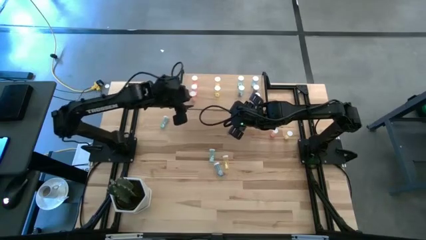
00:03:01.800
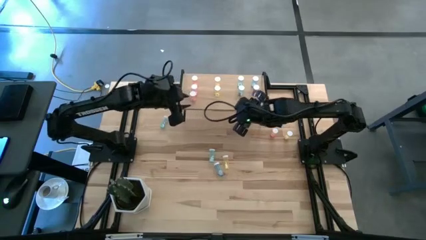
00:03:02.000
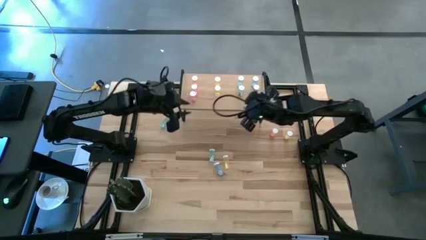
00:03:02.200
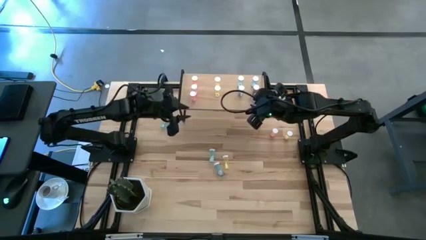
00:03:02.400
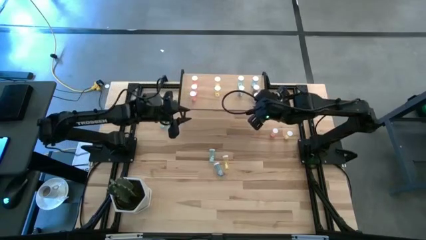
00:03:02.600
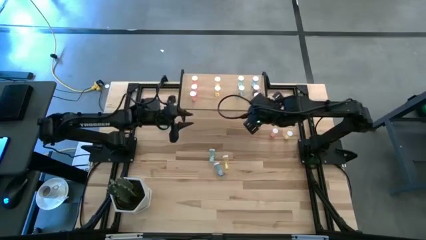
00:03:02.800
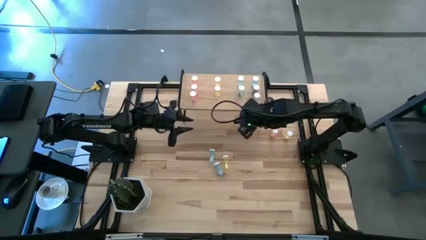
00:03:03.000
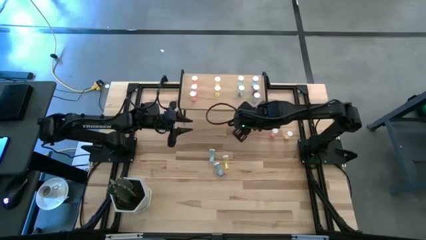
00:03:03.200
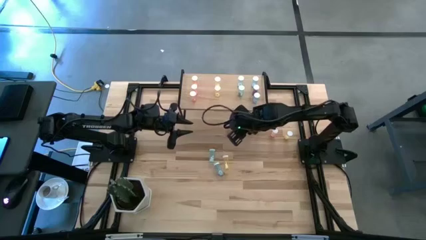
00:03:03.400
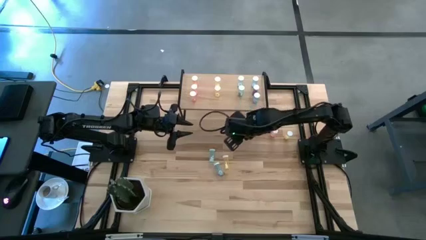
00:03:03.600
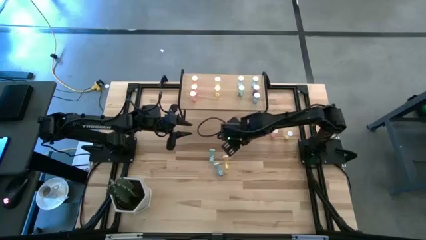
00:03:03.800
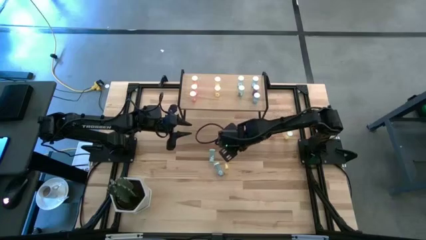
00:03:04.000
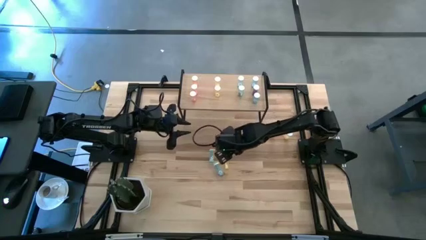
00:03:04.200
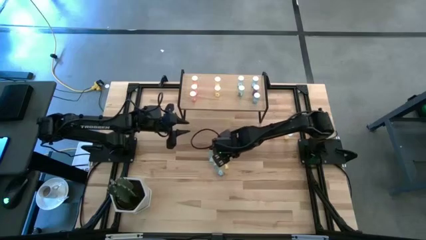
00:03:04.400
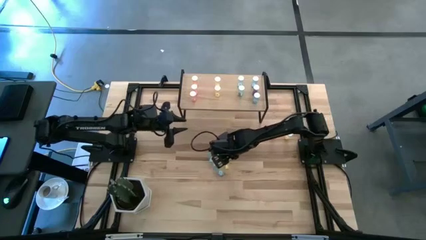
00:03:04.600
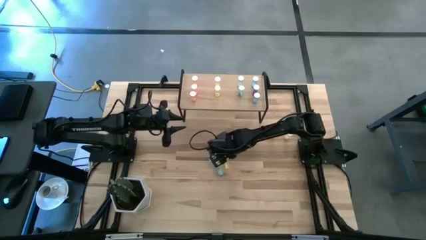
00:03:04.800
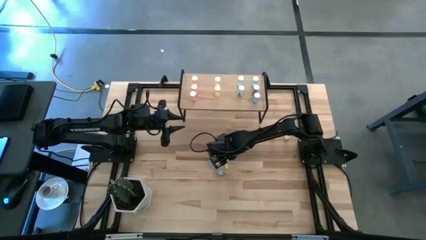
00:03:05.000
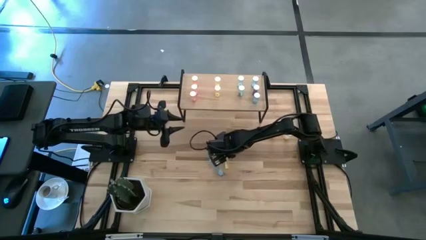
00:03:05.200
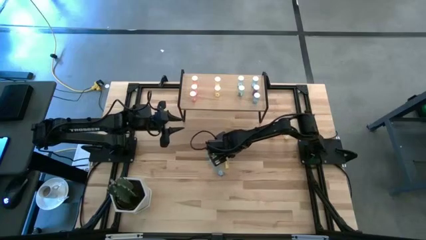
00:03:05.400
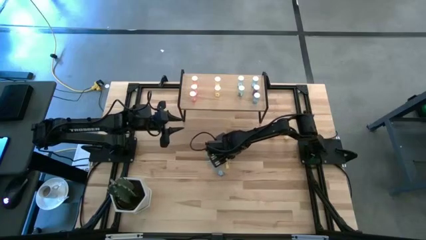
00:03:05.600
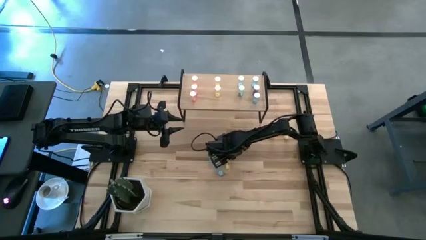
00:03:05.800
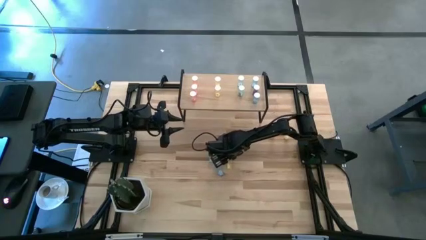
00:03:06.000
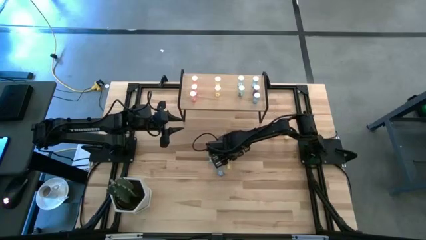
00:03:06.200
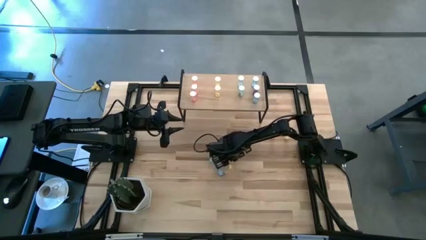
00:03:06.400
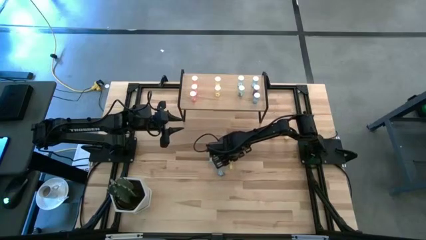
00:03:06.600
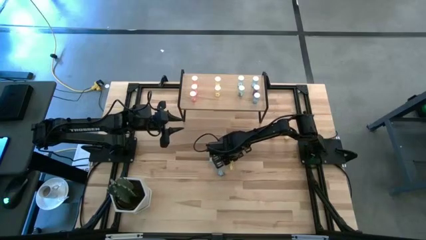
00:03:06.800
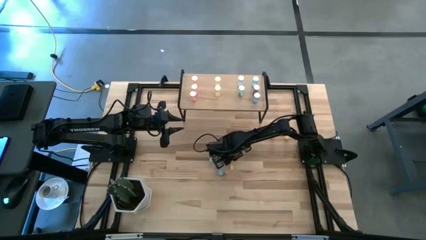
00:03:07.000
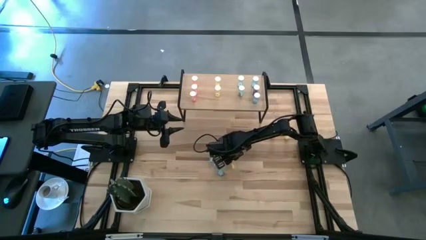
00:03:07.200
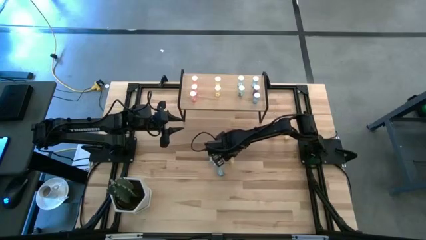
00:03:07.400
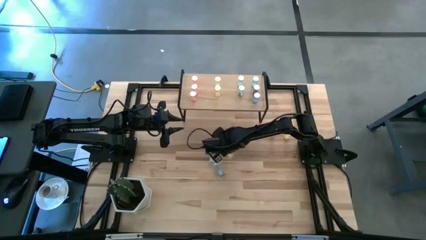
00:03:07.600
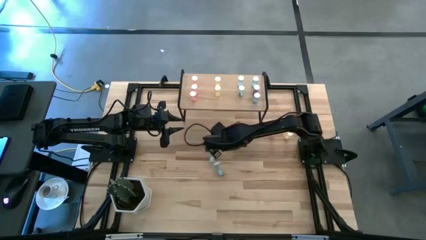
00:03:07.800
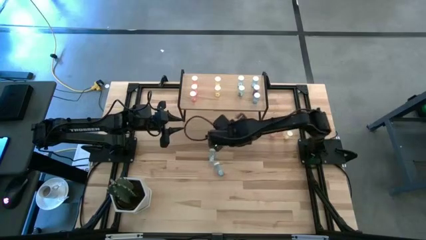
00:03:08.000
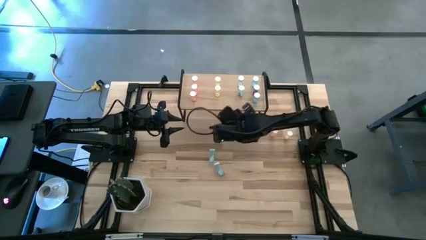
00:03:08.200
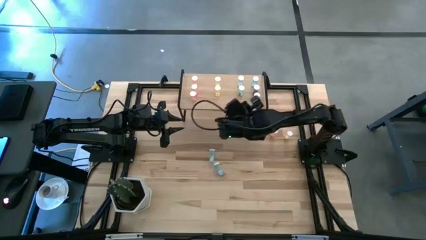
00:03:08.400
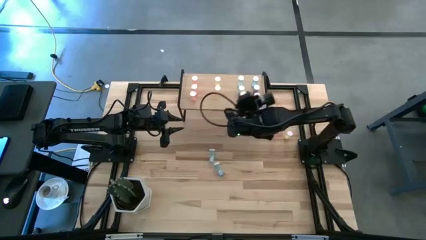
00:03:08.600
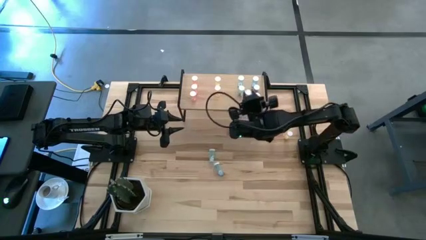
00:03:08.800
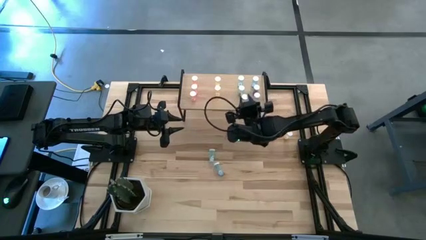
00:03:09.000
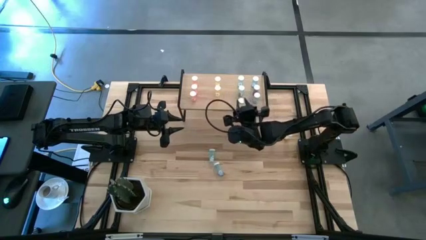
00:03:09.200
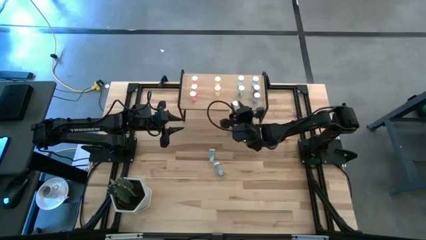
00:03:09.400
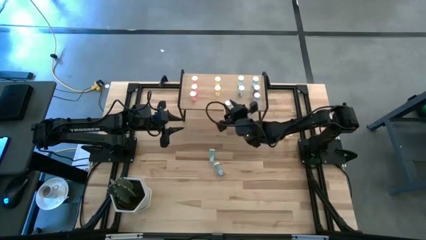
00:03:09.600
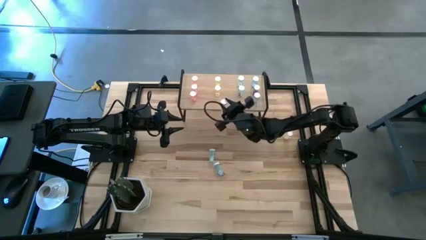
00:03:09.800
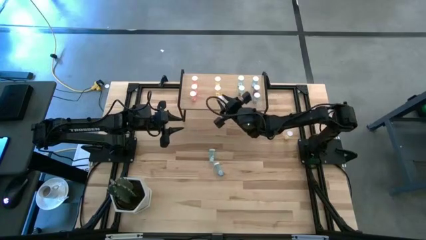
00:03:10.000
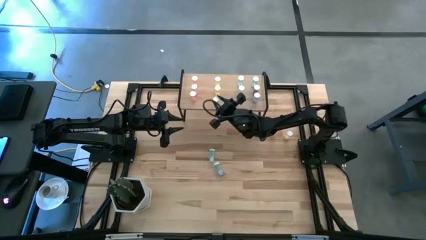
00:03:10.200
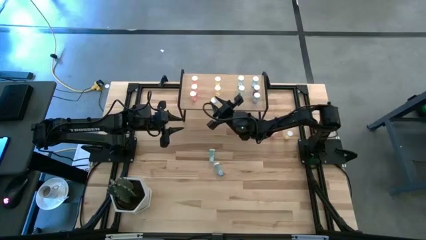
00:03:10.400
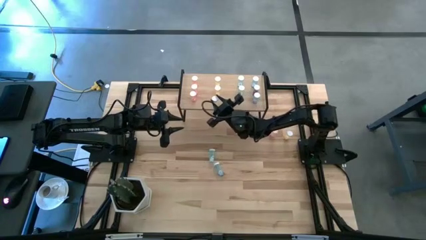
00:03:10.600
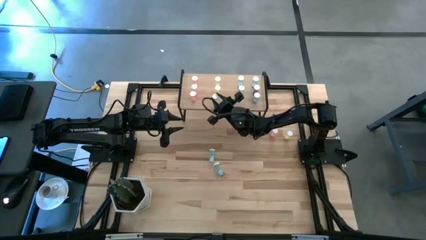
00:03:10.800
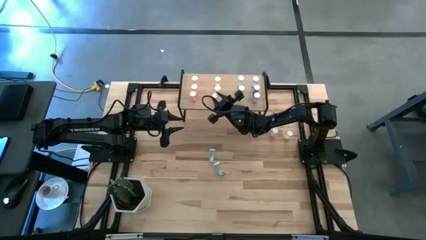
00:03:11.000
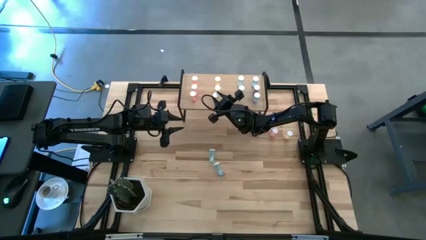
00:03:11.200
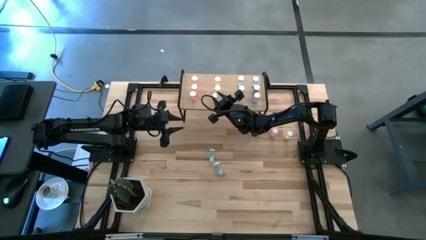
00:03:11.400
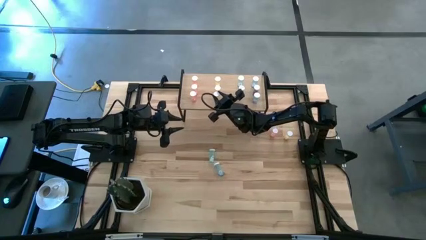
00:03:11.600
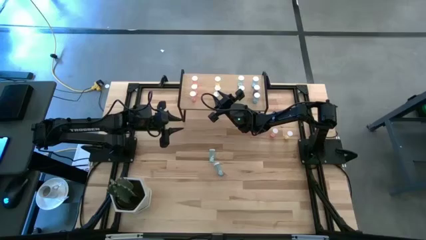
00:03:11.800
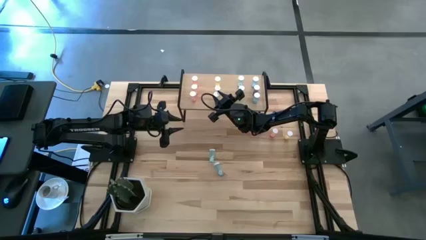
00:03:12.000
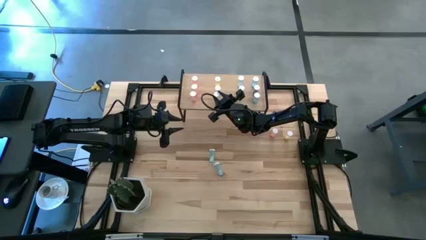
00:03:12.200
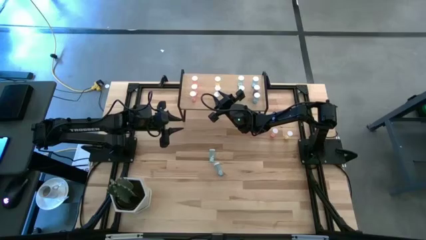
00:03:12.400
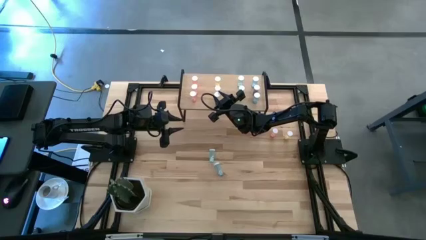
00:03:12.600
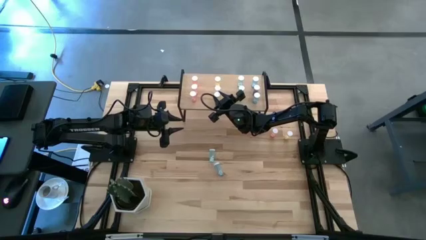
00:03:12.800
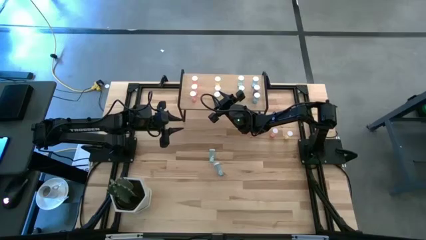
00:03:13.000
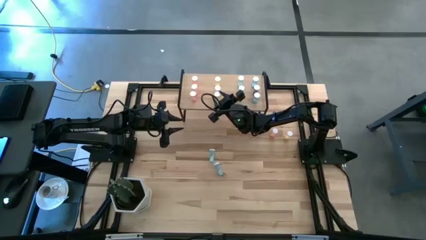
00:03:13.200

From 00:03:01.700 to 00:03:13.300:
Task: Pick and place medicine bottles onto shelf by color
Put the yellow pill bottle on the shelf aligned with the other yellow pill bottles
